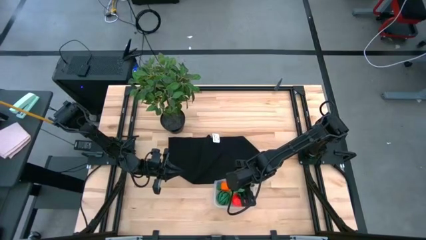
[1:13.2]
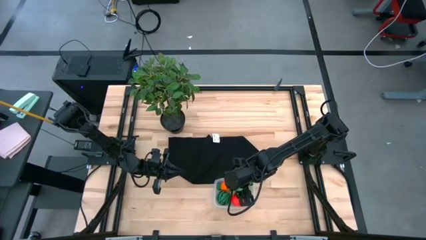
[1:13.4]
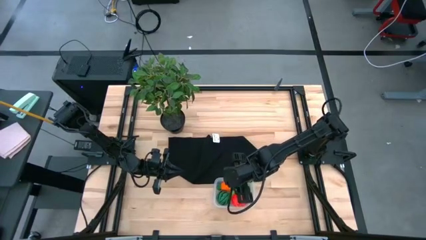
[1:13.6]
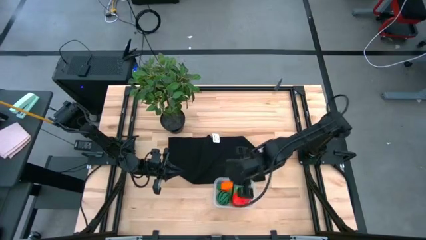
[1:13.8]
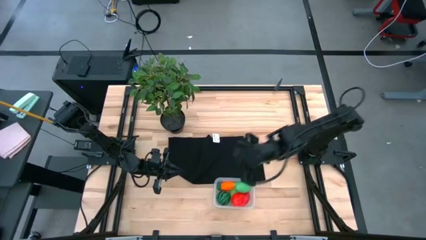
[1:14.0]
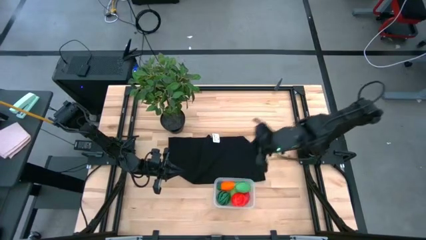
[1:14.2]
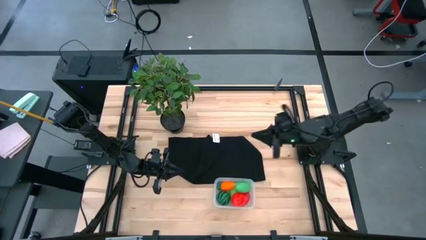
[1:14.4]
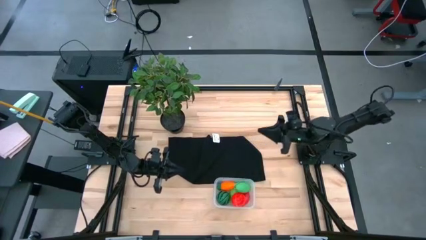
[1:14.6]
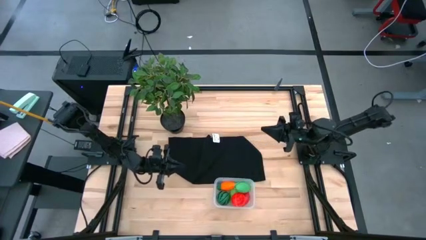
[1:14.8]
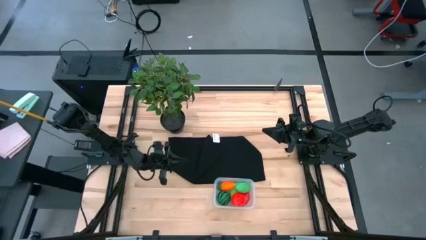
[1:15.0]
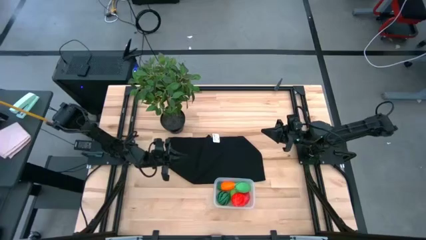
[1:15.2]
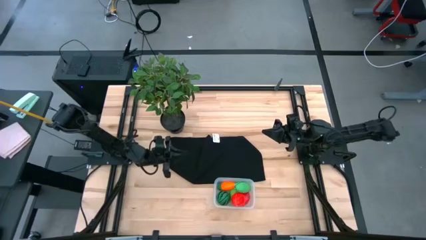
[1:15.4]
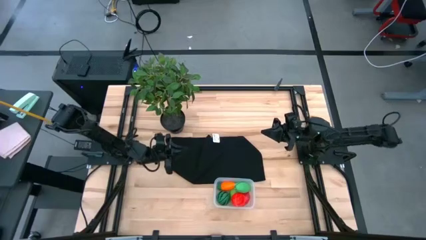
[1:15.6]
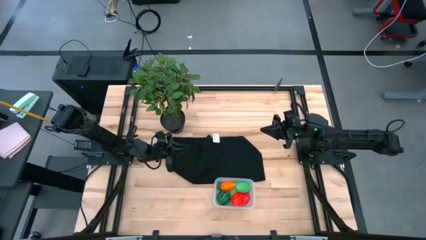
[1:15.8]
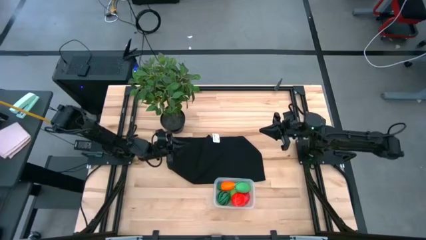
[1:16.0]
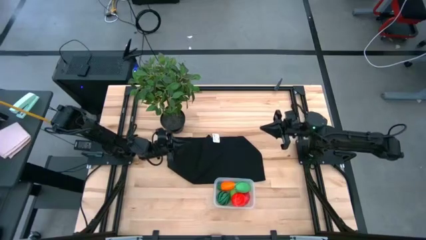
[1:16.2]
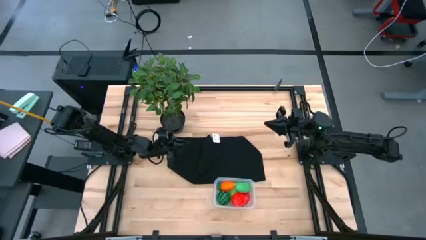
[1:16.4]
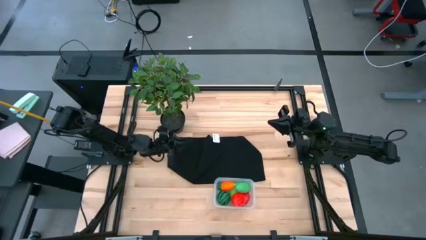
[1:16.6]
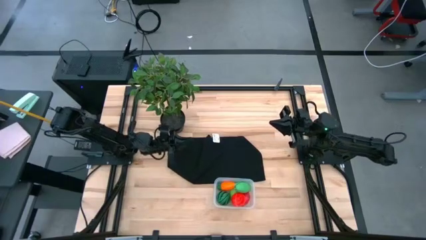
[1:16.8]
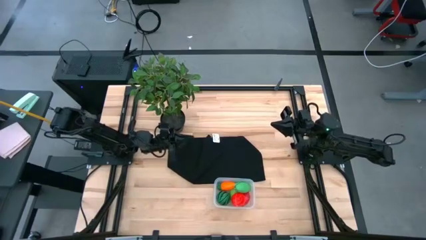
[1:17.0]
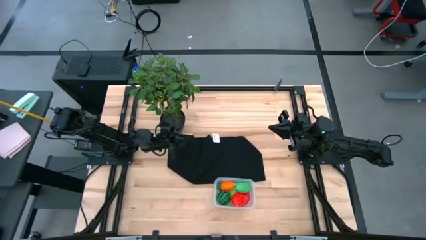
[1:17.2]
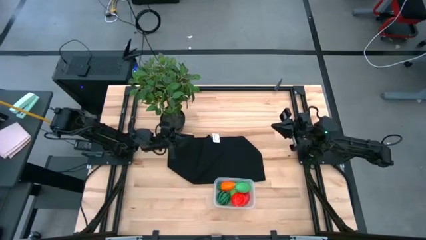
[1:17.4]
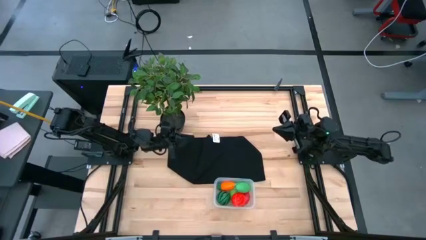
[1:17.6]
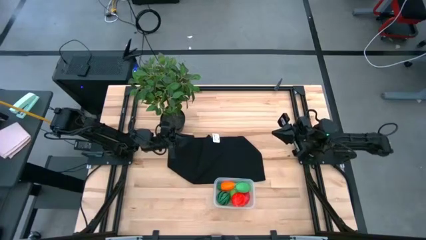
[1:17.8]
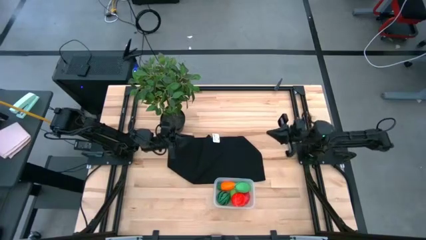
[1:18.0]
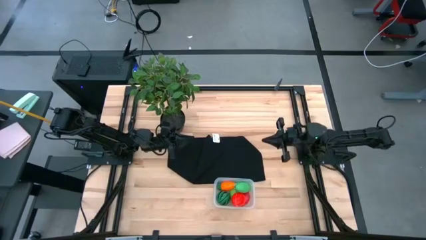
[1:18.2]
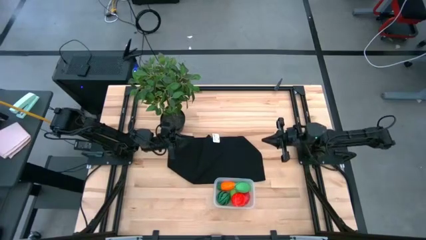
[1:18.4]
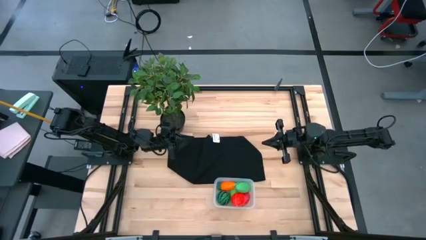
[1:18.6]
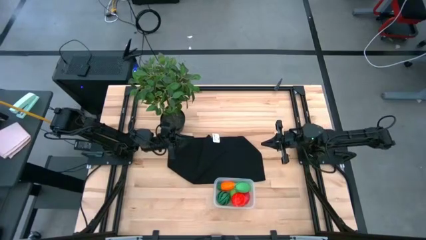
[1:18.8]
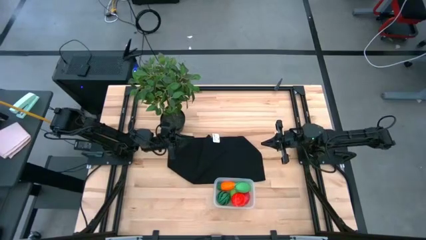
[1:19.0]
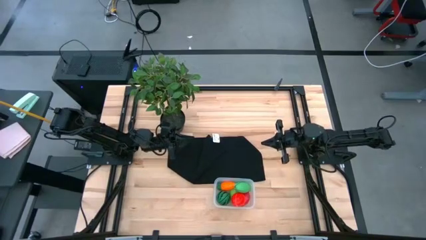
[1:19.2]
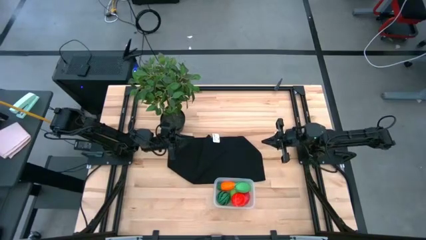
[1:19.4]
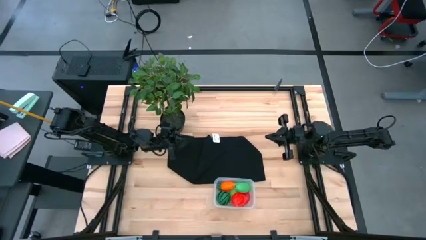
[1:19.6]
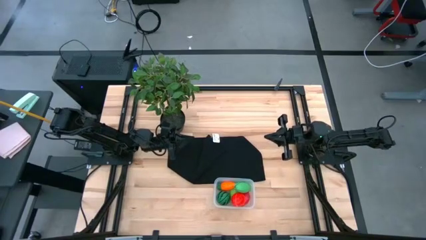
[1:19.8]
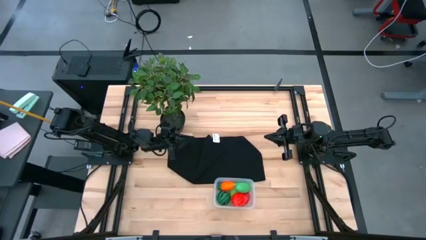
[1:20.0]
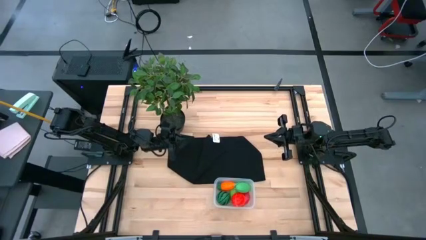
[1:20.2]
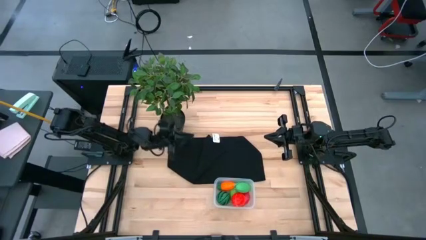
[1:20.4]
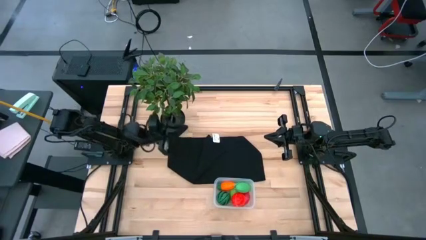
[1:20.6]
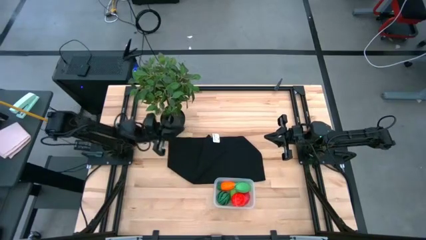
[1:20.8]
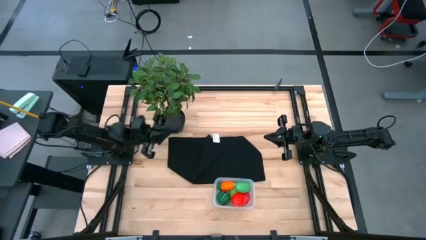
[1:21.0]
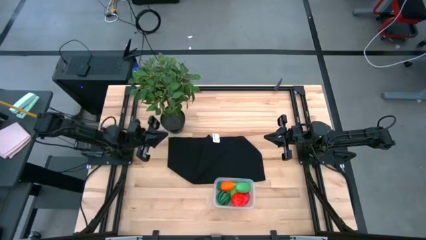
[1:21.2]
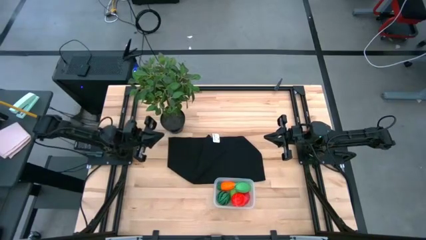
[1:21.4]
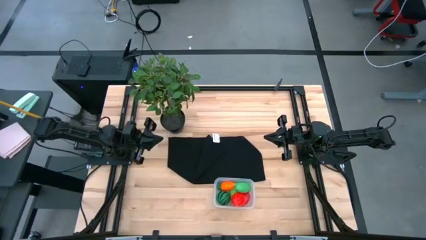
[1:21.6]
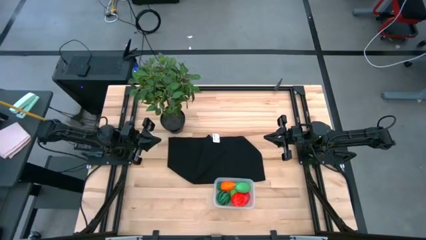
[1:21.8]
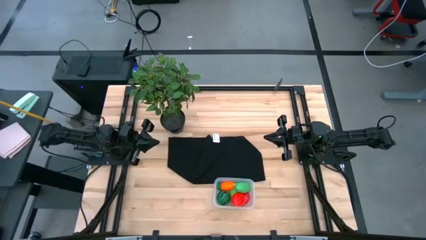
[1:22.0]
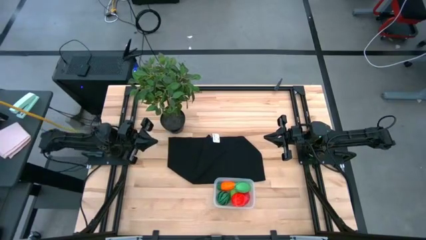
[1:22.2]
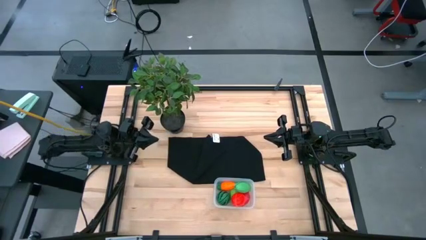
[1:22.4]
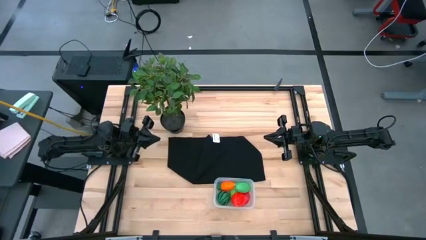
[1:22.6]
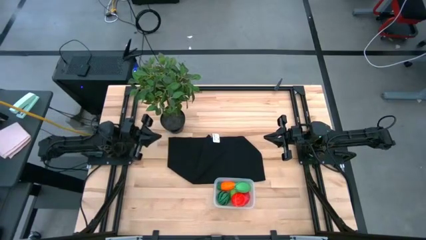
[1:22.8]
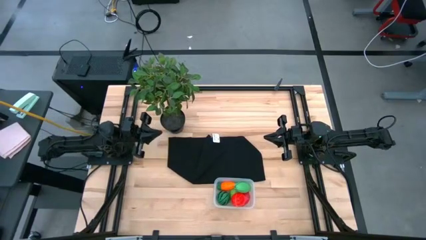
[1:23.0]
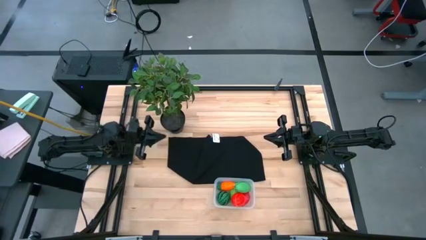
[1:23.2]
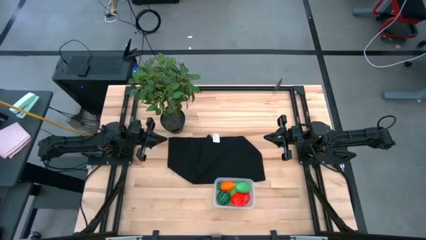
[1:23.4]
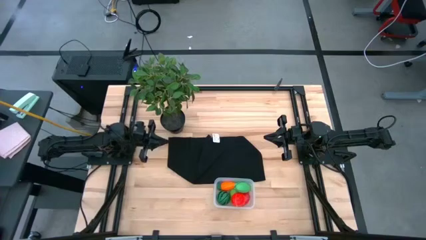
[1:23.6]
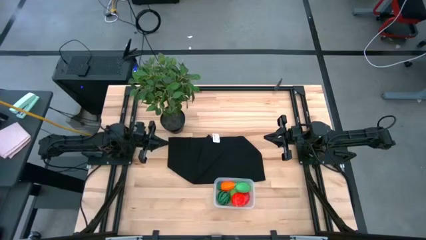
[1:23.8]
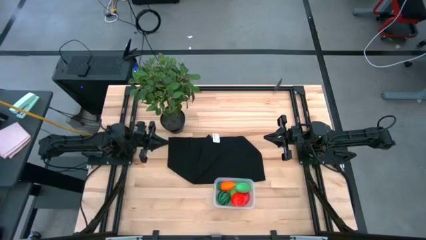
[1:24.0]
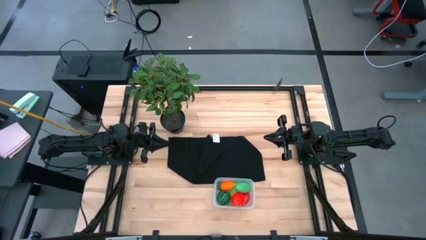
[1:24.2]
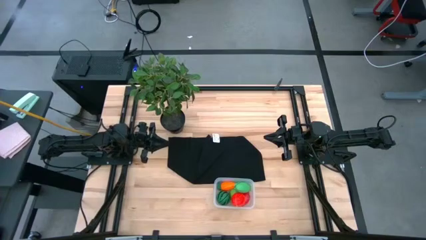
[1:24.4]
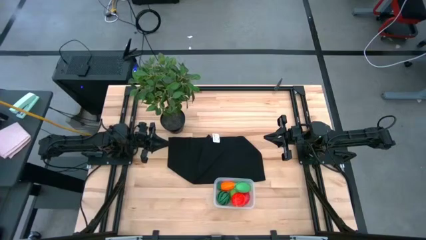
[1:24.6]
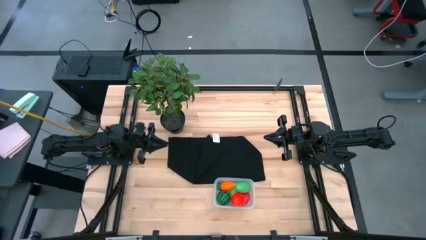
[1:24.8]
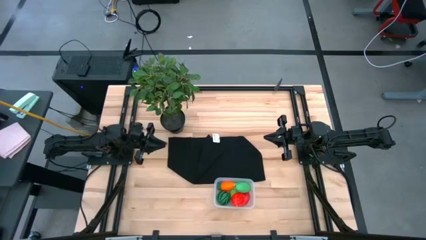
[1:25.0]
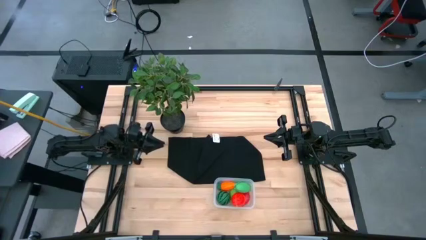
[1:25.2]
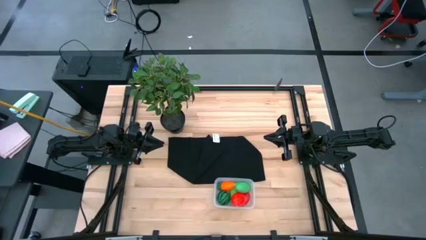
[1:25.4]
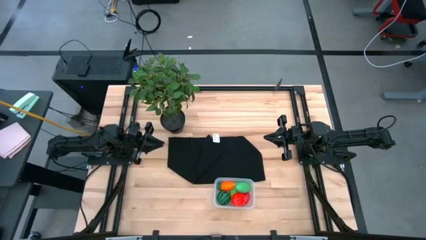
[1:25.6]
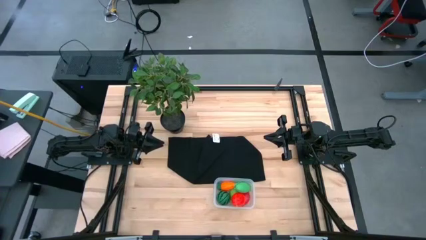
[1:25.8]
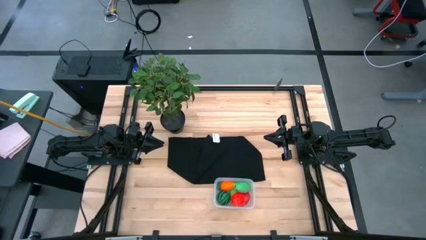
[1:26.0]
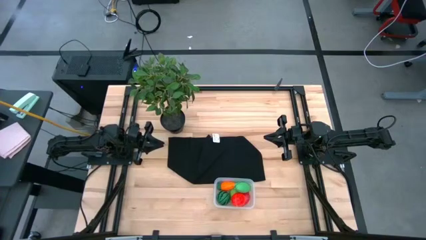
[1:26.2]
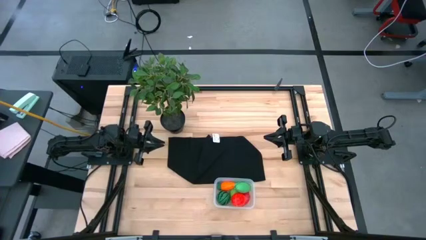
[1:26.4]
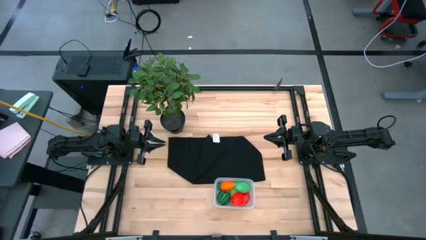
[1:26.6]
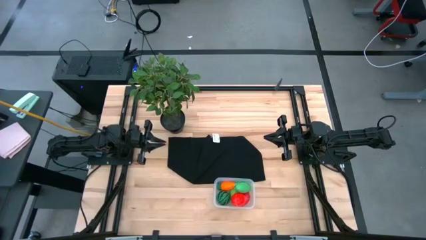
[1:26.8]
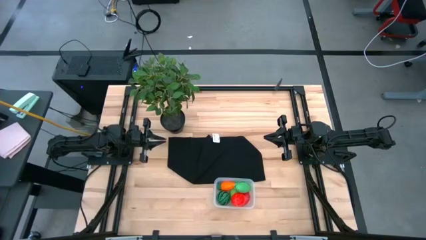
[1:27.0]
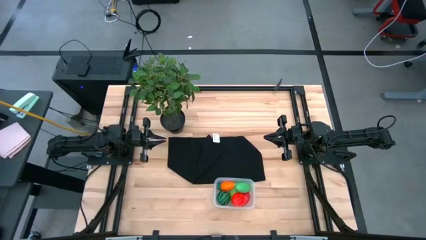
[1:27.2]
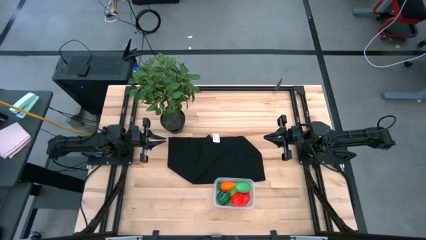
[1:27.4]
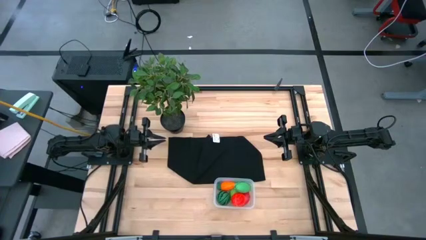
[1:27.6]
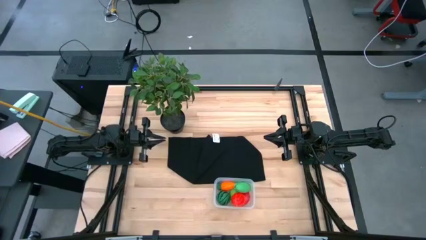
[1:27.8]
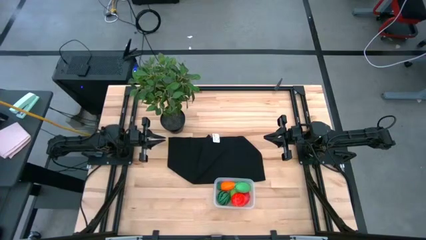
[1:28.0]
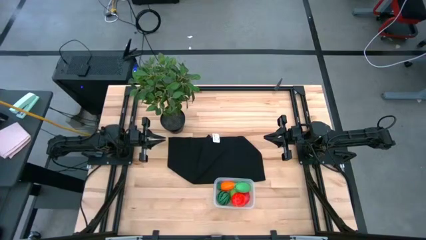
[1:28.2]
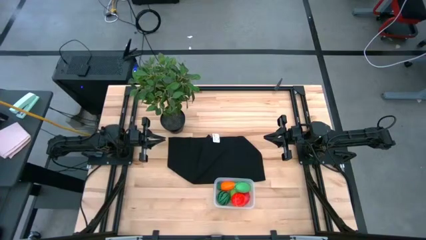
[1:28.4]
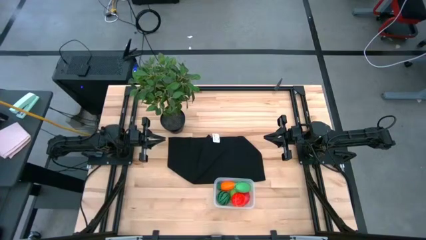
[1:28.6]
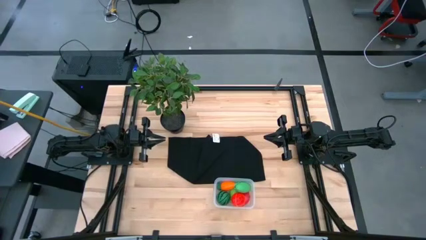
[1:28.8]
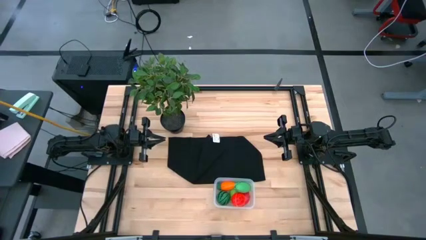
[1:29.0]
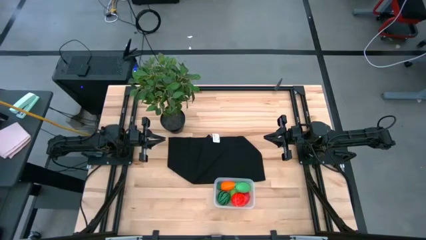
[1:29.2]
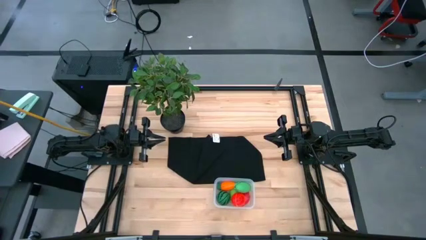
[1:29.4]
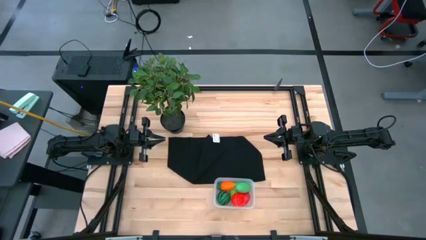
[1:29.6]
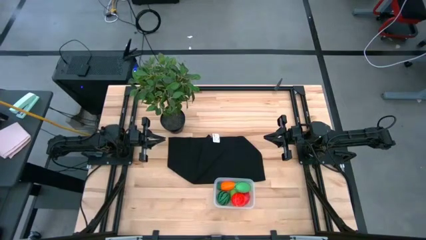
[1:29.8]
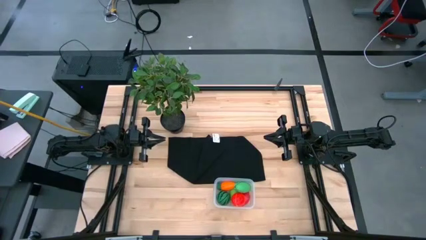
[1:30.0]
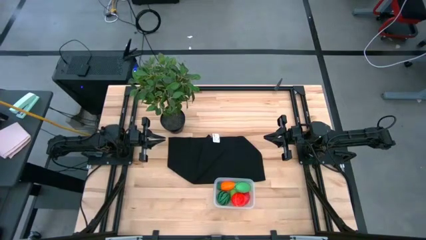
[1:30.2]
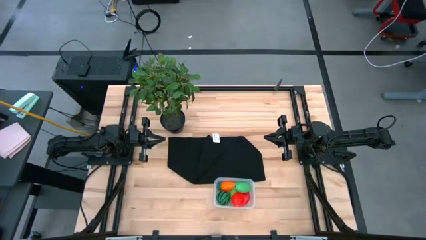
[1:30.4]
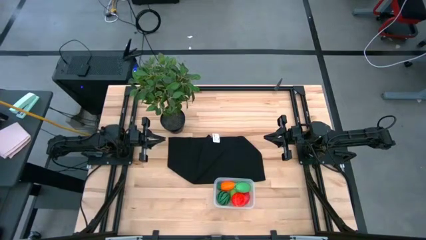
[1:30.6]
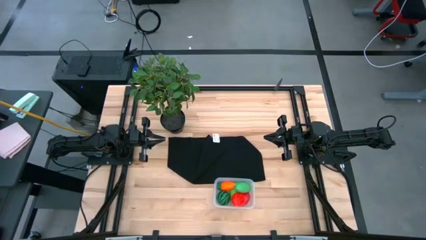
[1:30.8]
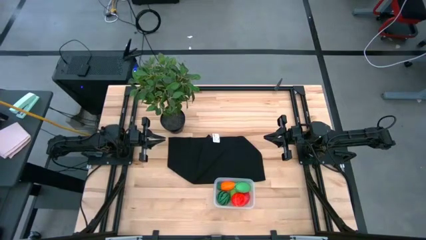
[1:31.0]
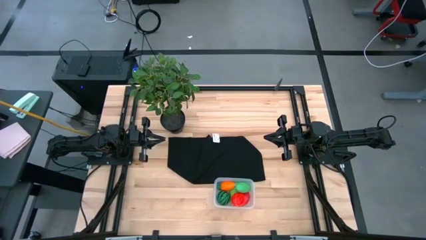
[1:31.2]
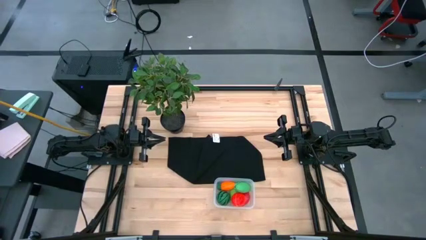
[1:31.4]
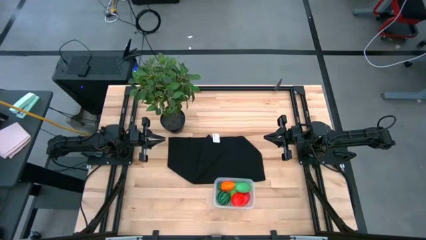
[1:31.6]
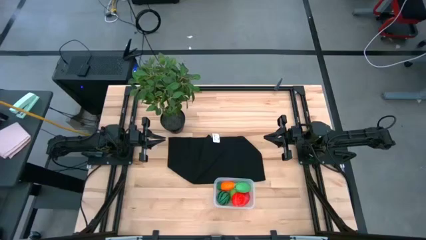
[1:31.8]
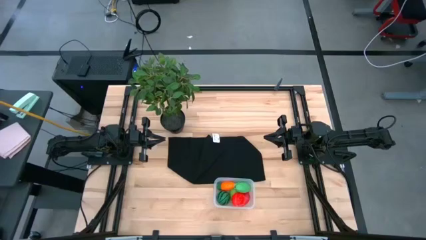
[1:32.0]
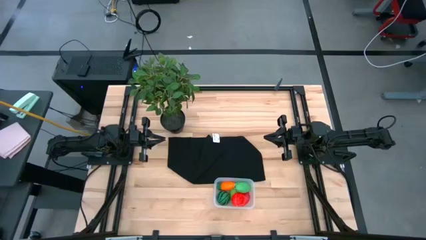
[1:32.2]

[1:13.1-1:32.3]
Task: Pick and placing Produce into tupperware
Return to Home Position
